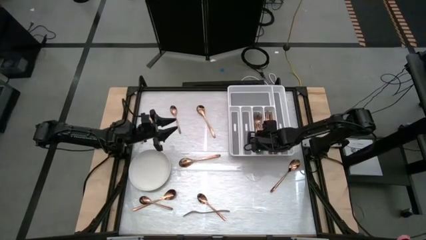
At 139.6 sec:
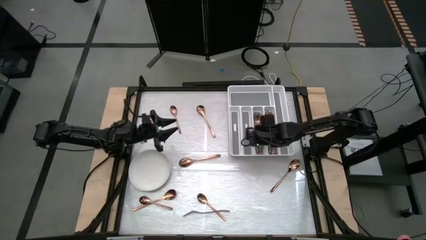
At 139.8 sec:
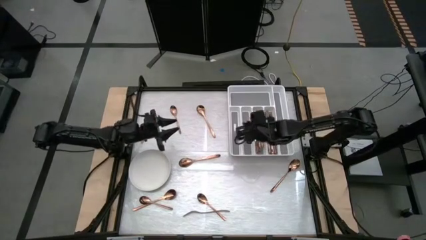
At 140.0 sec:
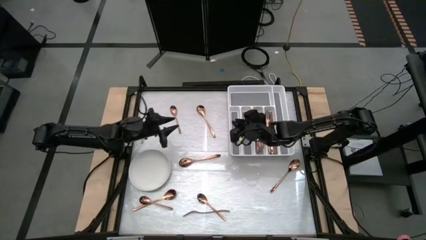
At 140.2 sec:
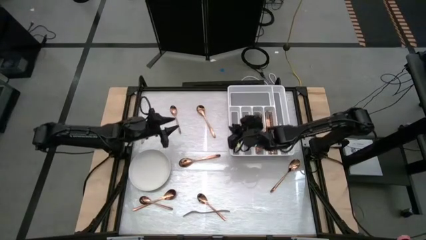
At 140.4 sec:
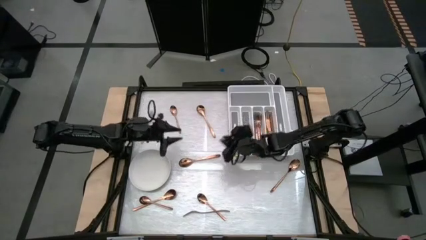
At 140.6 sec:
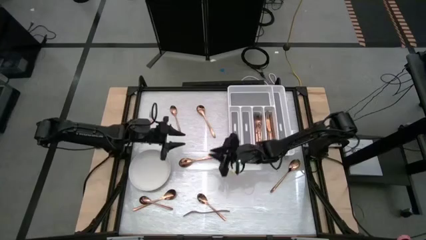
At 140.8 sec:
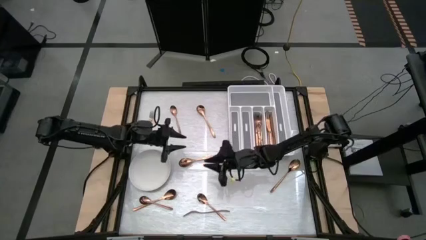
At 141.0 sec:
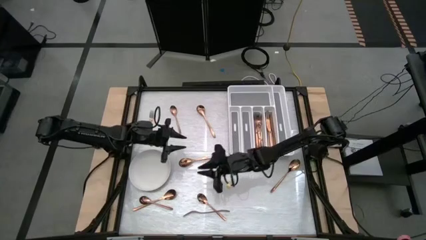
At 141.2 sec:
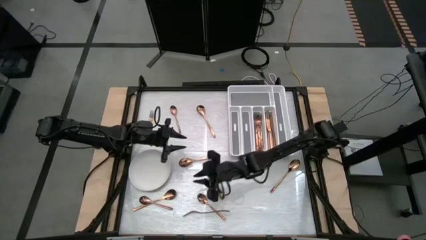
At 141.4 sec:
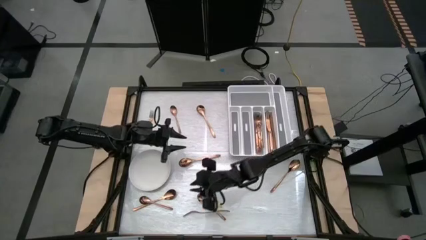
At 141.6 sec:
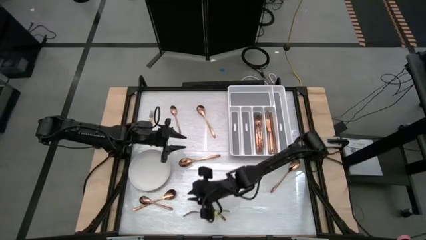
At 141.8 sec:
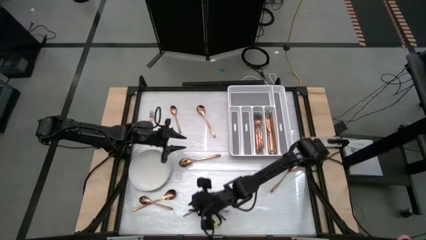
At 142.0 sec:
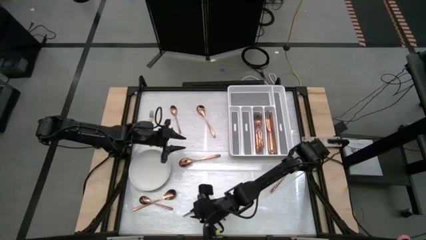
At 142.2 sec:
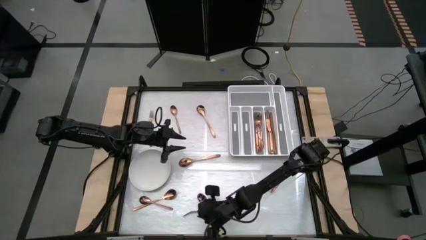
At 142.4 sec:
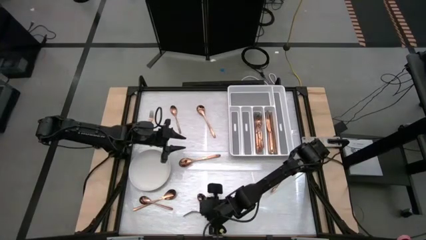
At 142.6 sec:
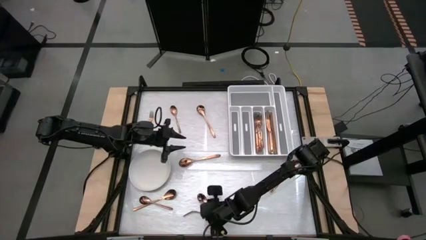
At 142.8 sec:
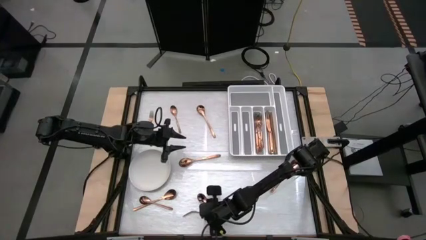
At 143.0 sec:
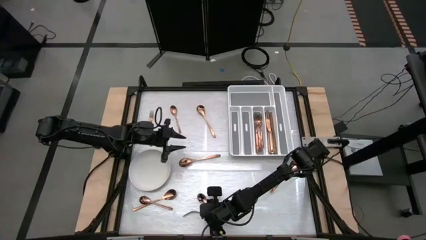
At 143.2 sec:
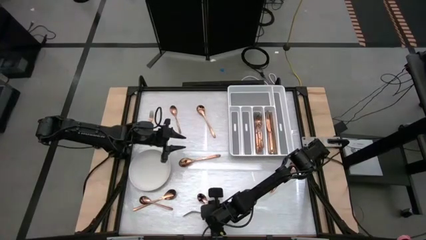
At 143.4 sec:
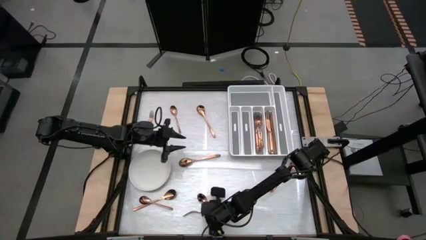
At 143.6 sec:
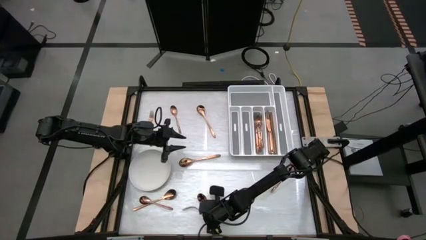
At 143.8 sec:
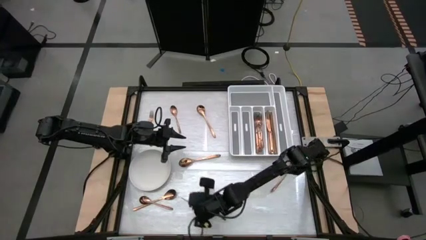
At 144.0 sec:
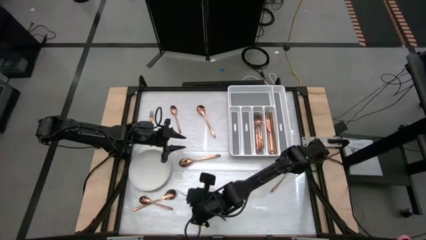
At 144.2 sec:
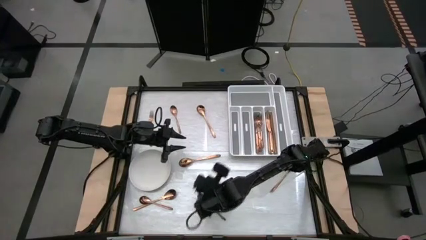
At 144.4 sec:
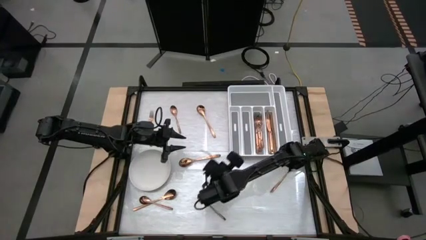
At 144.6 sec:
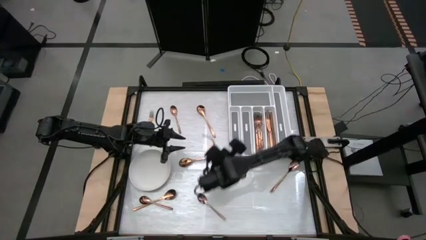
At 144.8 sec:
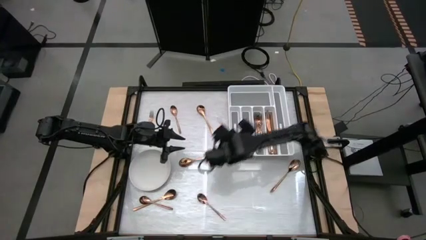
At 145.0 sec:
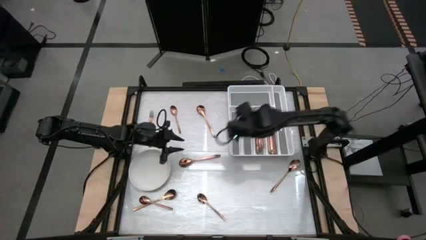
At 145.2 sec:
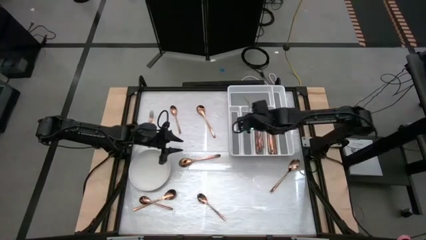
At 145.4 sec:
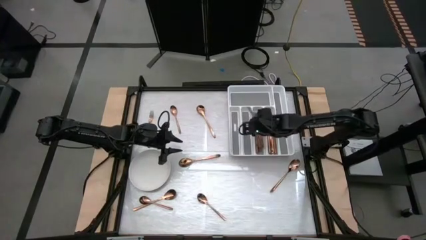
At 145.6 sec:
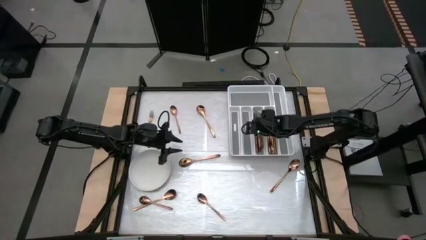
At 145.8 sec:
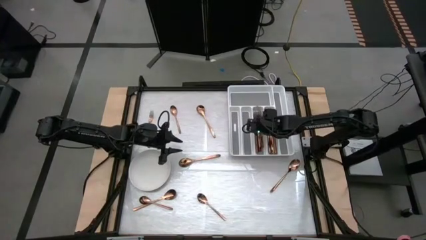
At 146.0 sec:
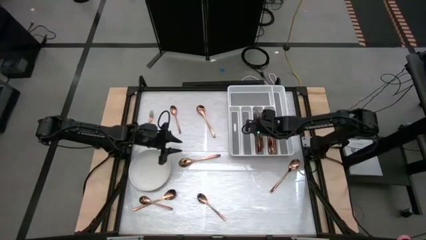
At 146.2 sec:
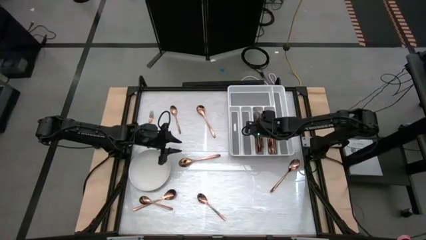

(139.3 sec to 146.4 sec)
Task: Sort silverware
Put the bronze fork into the silverware tray

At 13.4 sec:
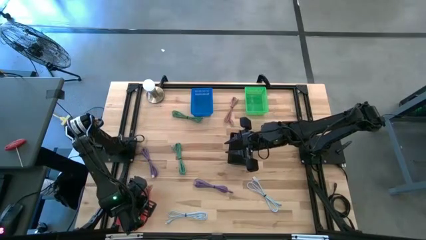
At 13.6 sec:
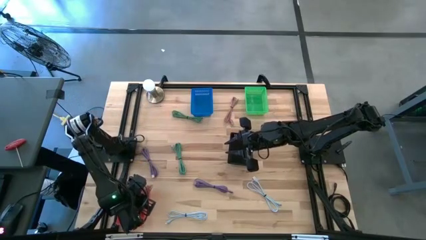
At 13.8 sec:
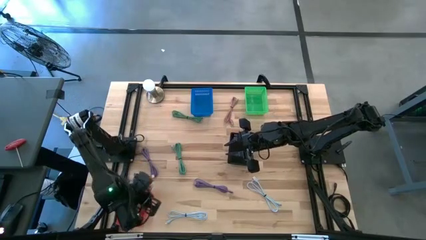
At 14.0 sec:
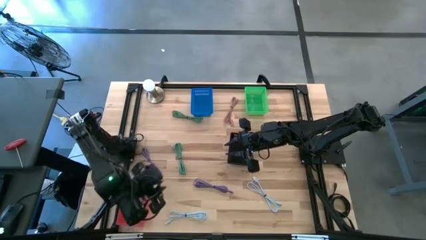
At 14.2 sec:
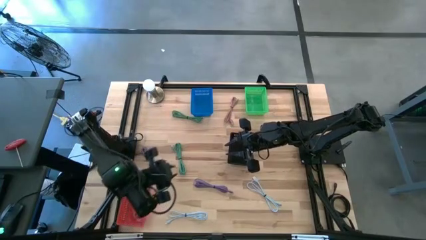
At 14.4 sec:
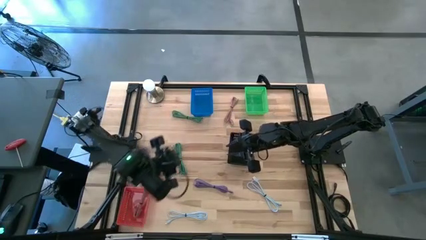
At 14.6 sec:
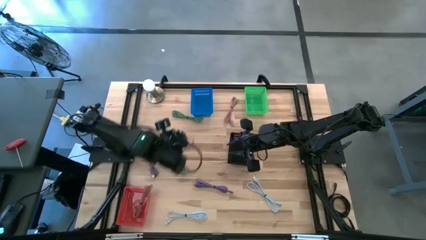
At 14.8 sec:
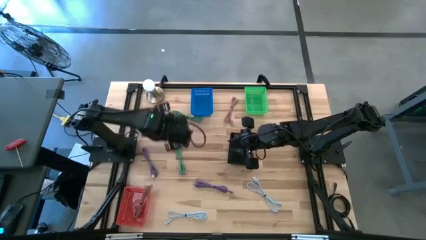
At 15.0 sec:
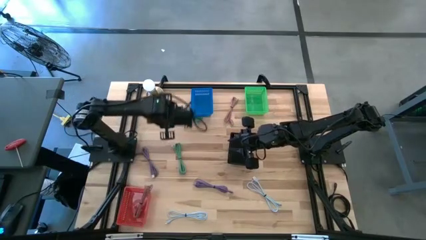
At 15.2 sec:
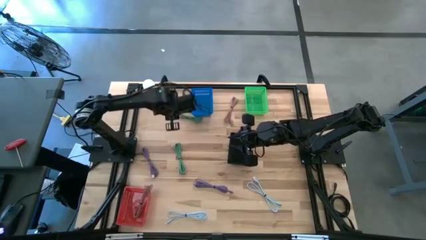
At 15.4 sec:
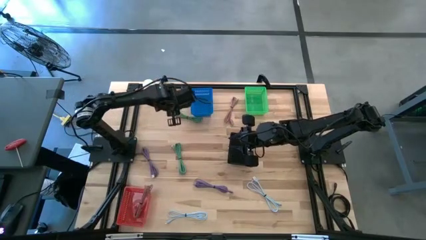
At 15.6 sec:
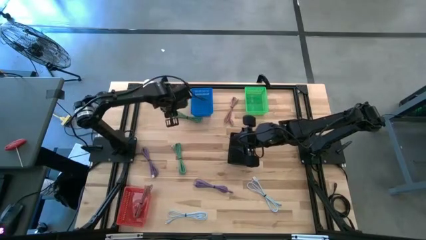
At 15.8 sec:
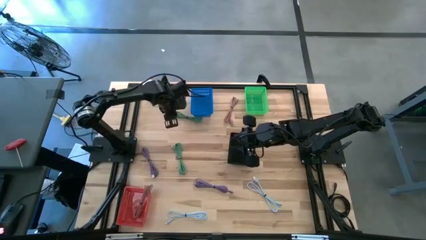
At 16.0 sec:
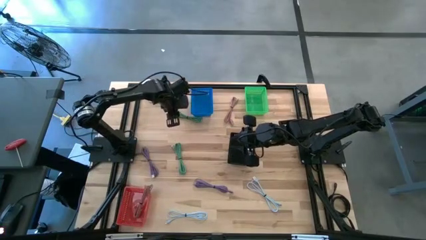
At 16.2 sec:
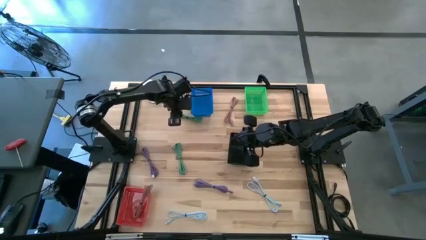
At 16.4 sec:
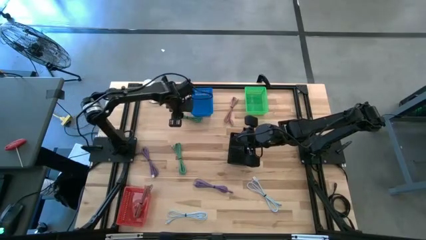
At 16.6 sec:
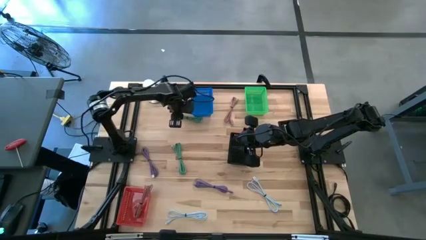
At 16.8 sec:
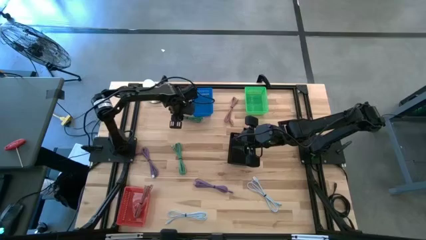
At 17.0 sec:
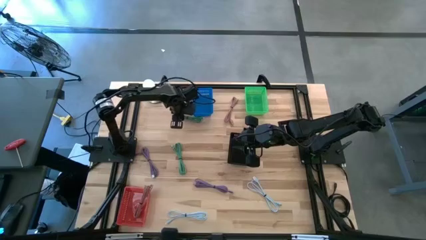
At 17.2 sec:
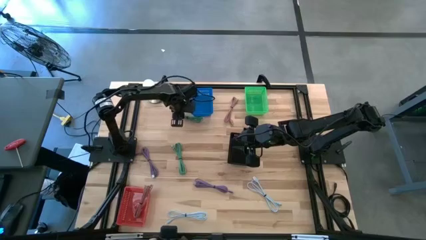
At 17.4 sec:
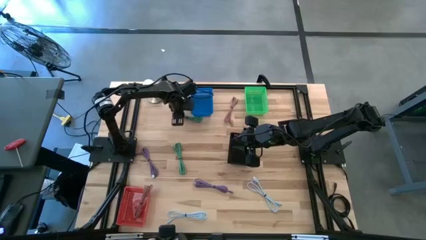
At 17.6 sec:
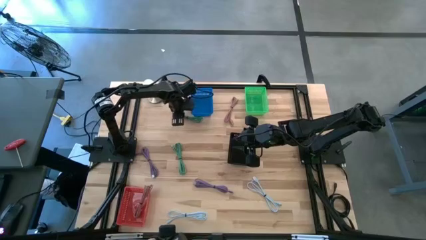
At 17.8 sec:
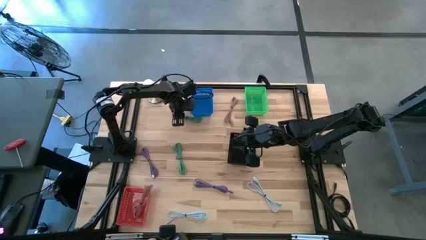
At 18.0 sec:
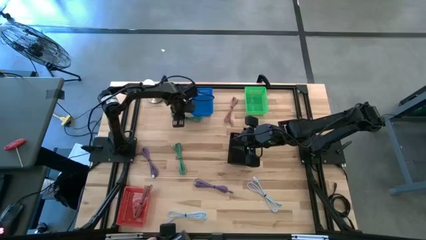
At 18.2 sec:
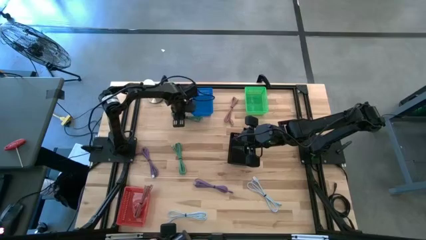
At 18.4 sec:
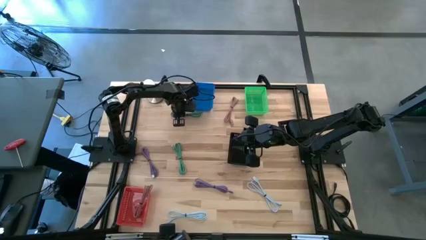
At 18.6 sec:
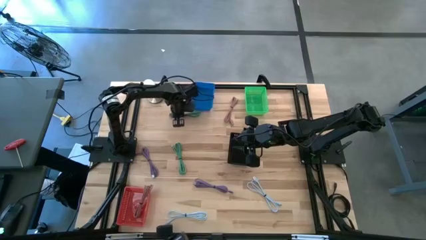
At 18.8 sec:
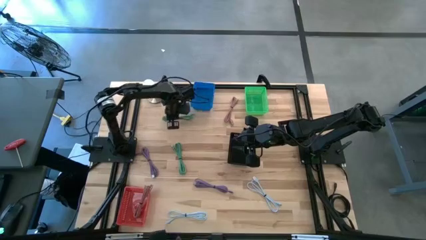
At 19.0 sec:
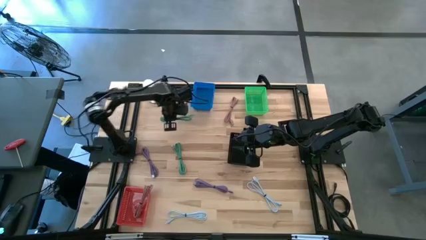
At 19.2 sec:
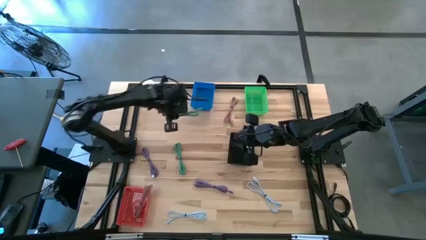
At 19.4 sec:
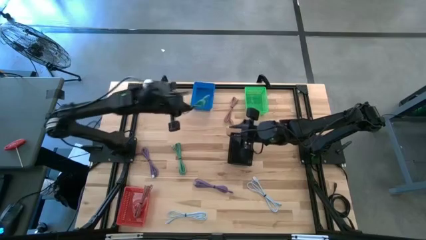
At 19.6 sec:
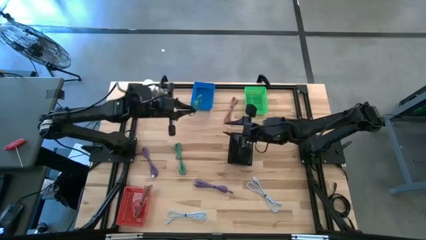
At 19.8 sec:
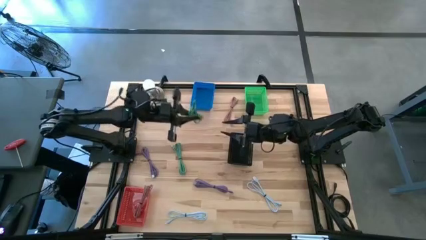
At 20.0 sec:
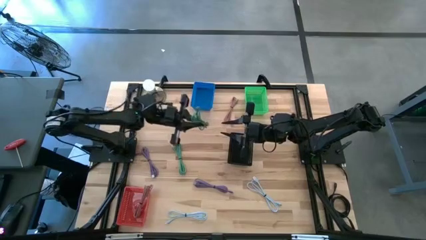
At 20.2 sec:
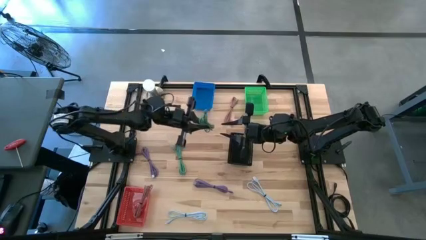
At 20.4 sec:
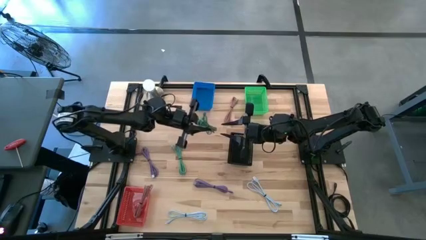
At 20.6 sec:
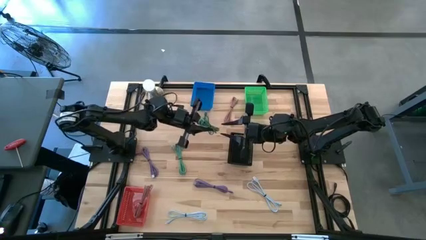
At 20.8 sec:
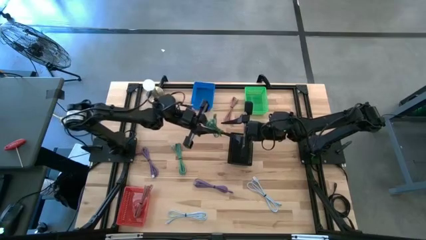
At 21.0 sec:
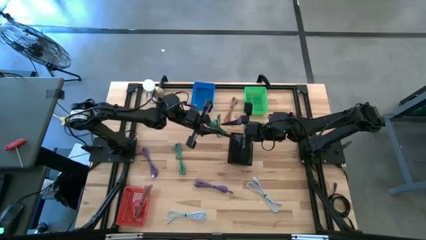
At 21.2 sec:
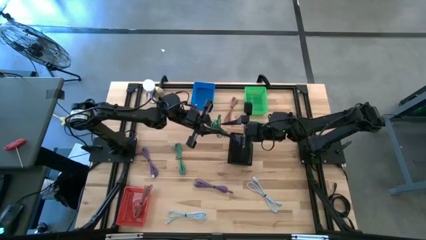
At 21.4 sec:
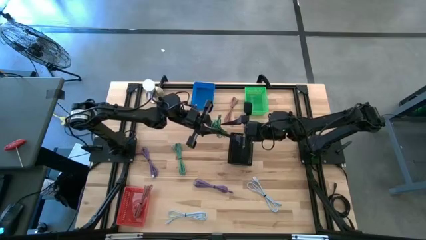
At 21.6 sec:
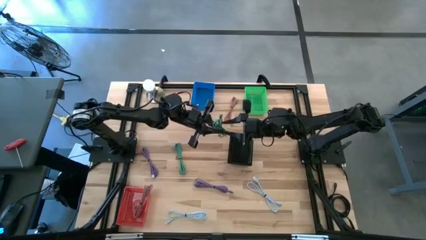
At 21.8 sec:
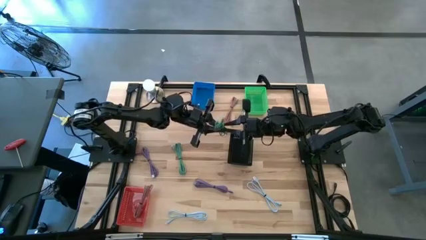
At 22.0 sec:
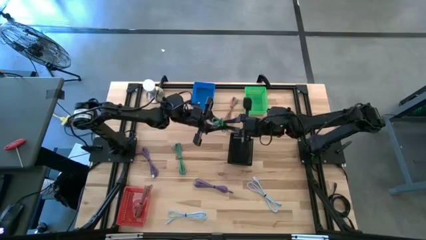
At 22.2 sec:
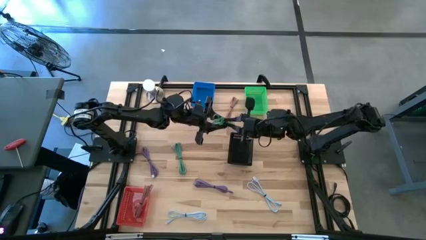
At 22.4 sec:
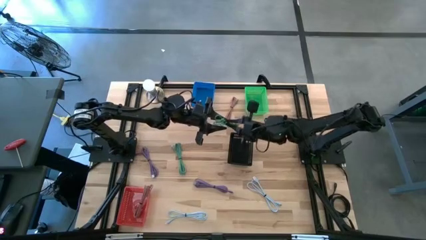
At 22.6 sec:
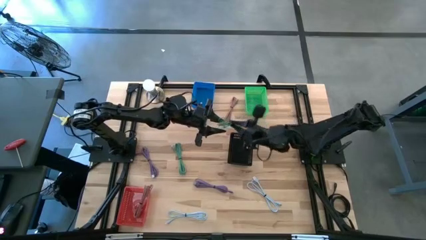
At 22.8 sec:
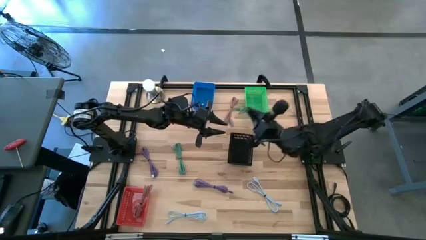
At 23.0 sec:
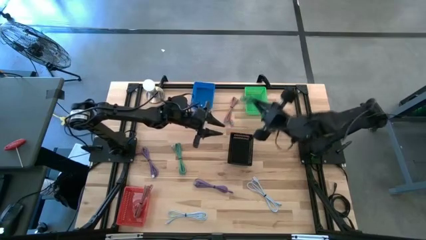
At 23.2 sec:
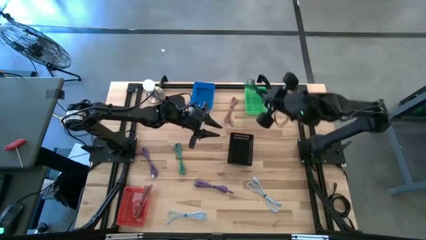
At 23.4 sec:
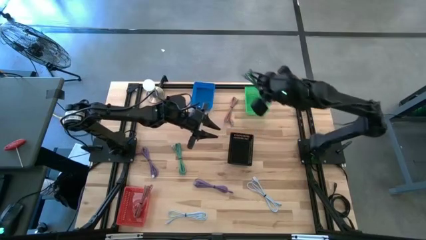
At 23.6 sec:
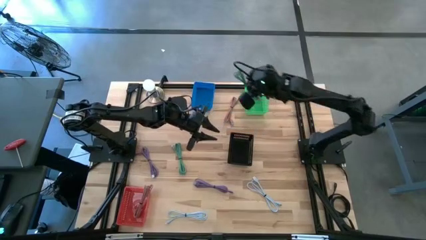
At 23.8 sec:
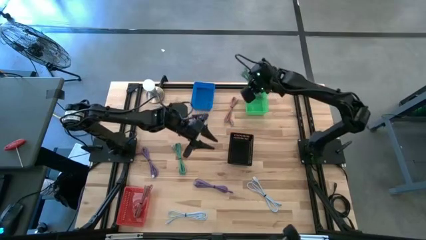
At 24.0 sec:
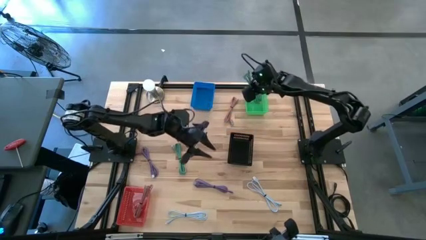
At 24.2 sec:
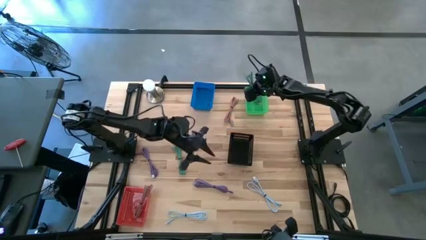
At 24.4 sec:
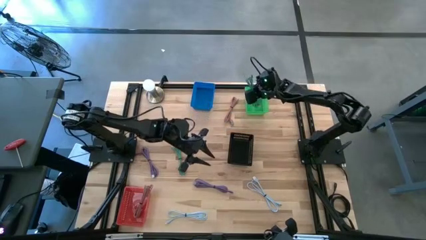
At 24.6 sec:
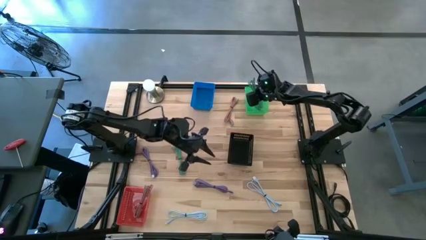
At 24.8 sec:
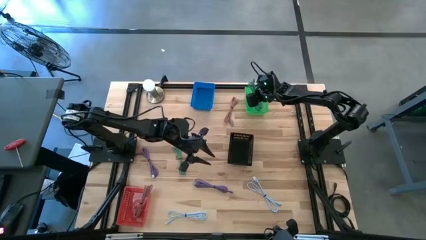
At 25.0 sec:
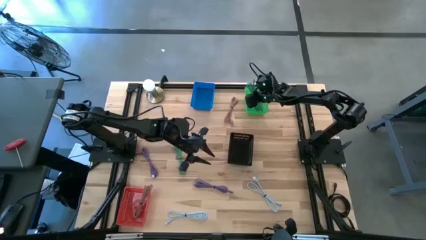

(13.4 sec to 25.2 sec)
Task: Pick & Place USB Port
Put the top green charger cable into the green bin
